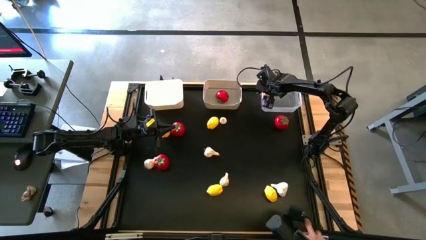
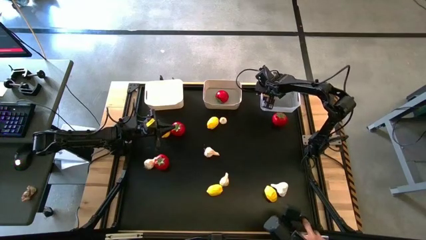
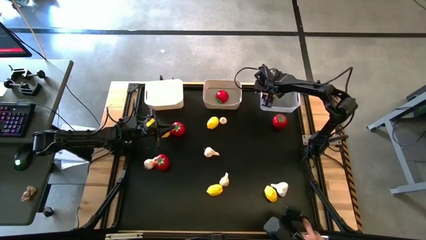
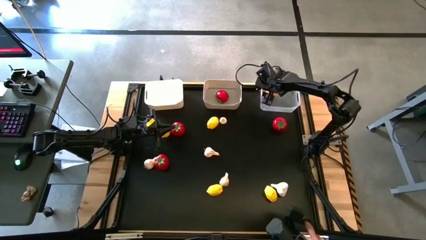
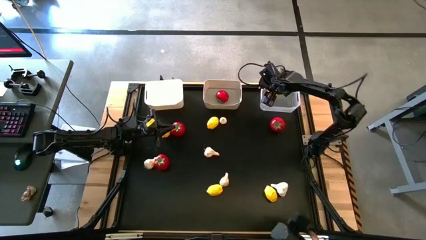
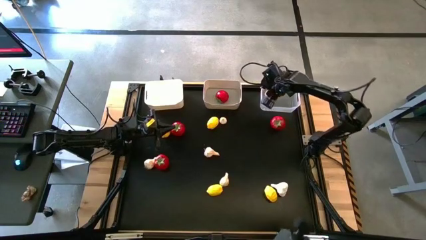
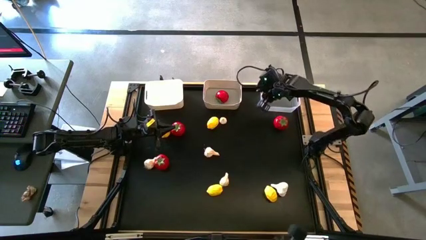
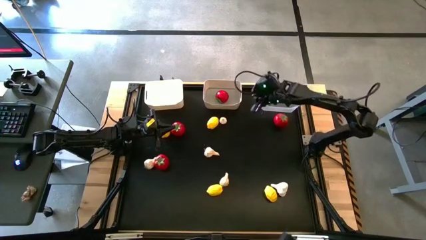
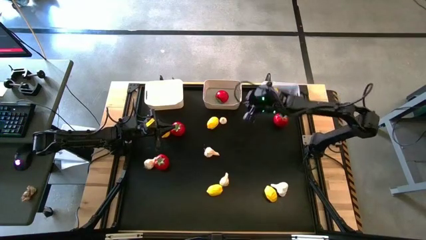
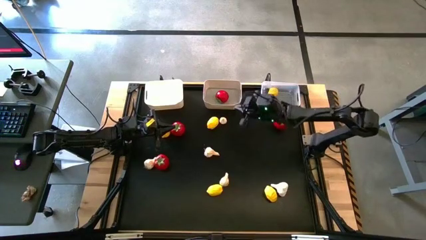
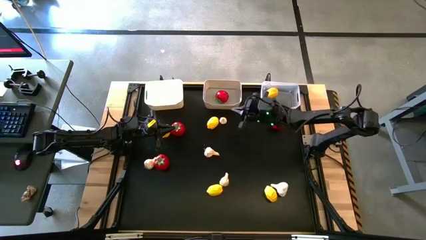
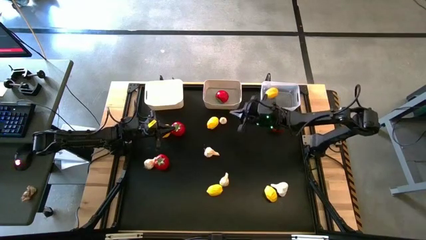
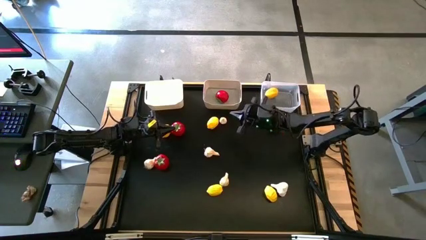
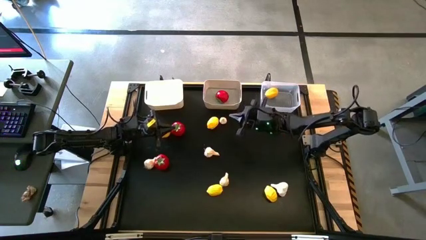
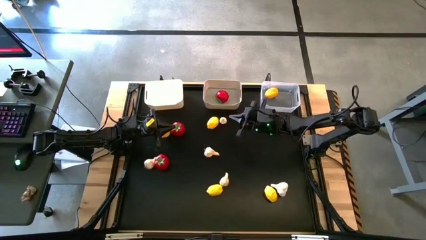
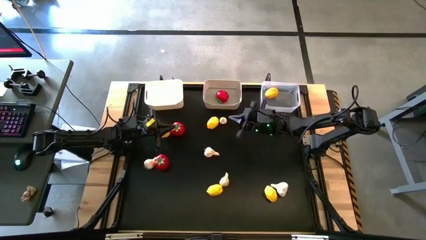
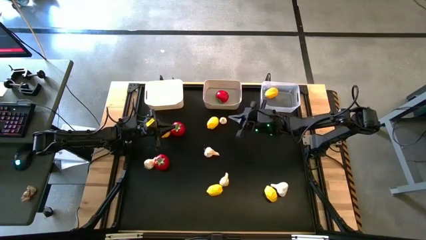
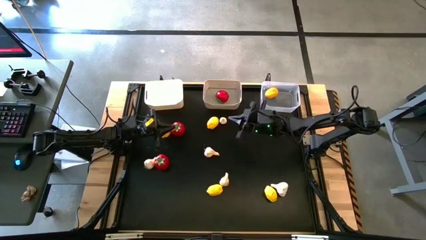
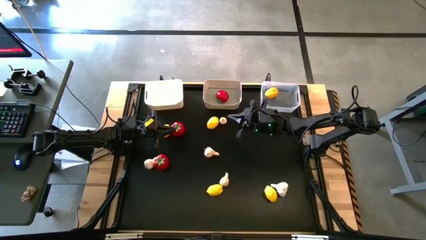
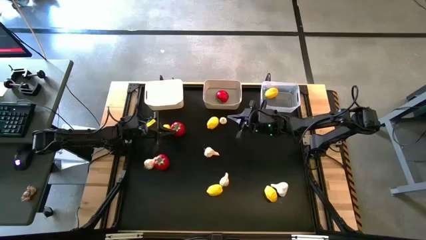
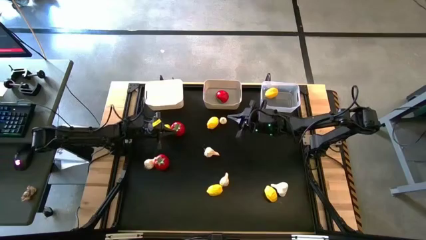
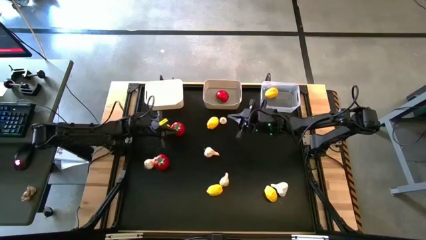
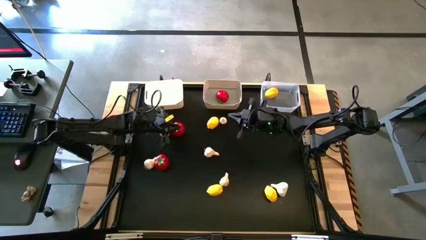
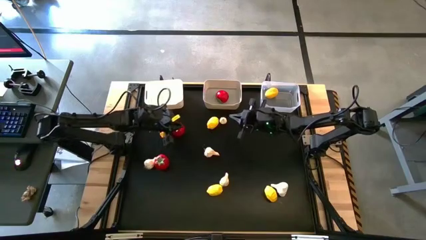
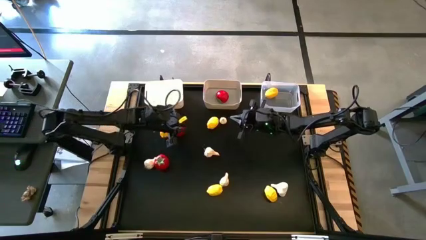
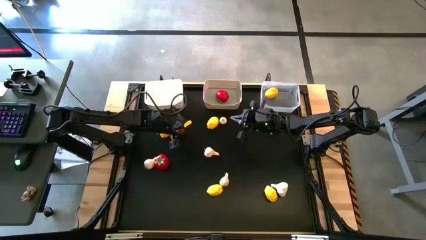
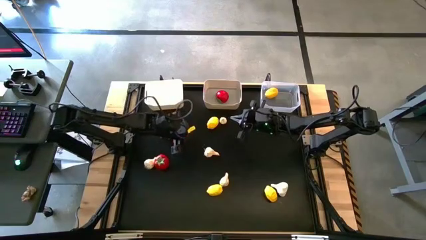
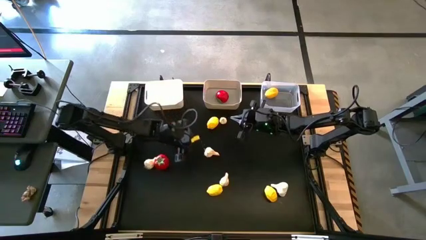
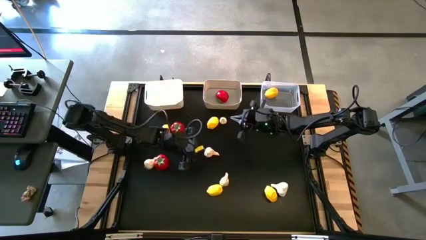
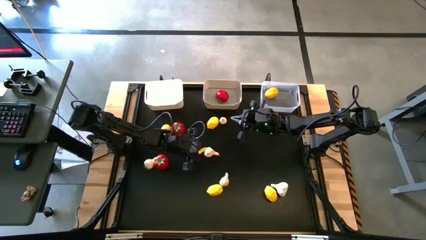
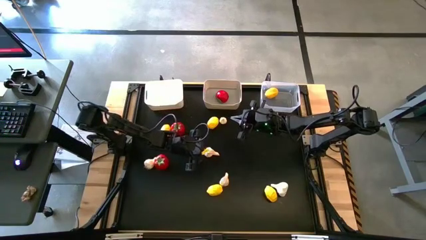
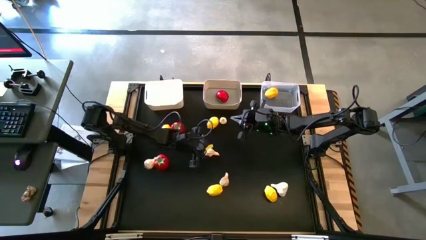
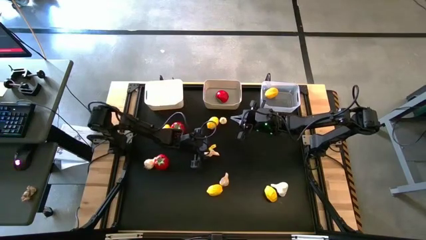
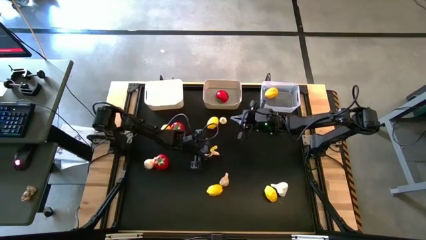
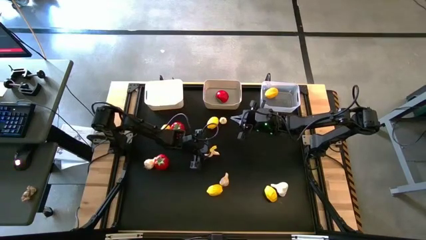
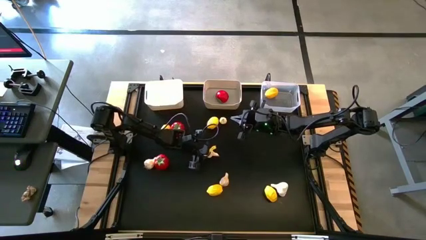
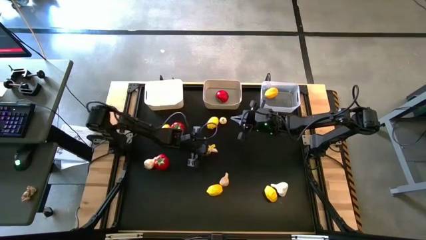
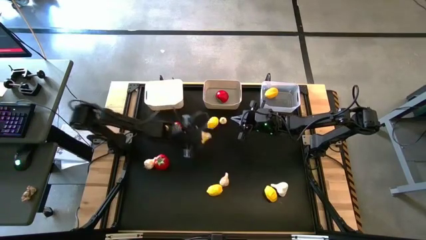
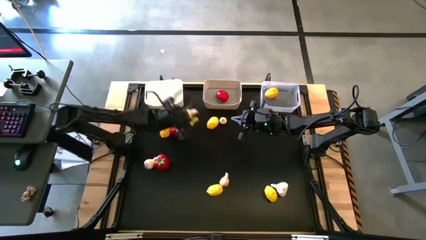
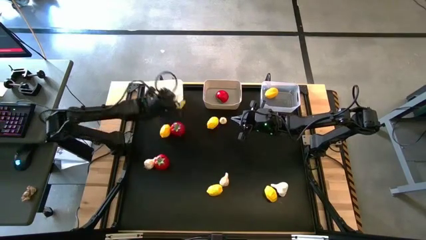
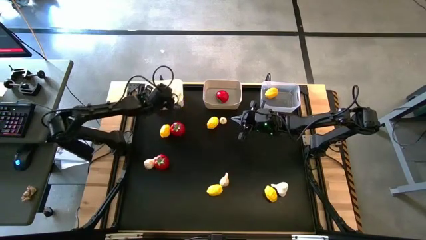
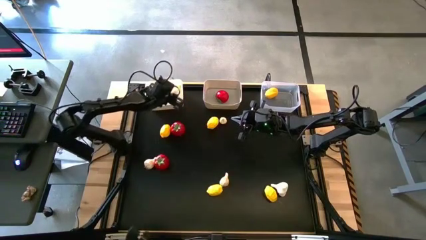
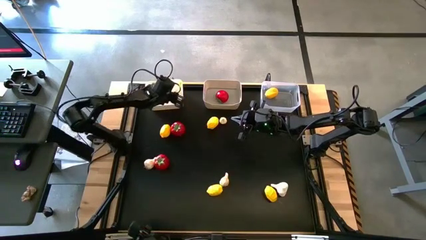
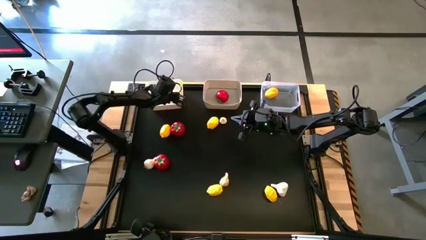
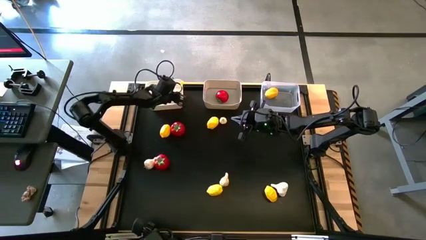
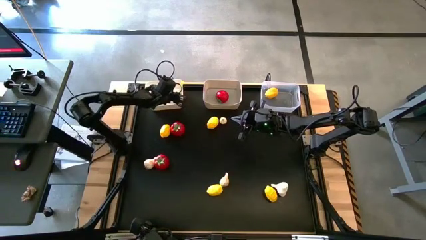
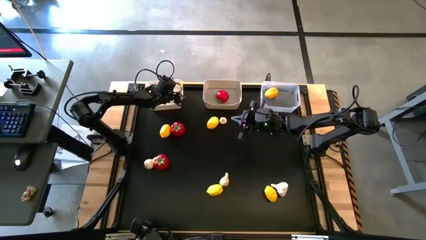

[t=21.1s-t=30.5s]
Task: Sort produce into baskets
Put the middle garlic into the white bin

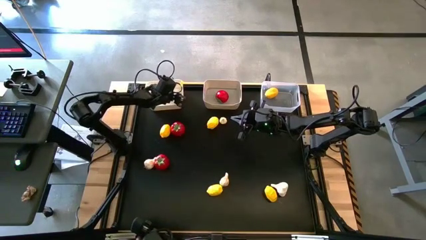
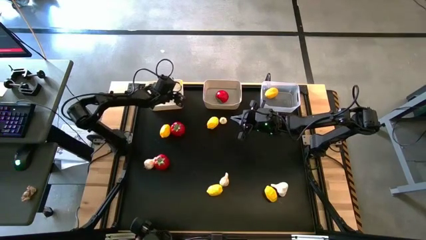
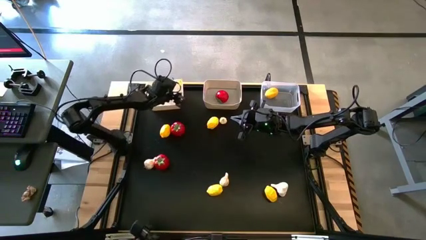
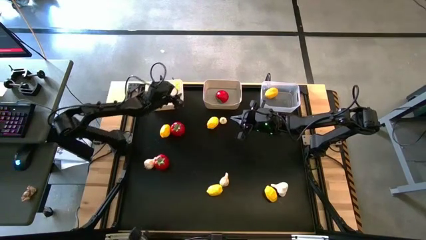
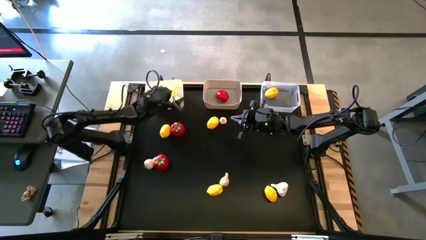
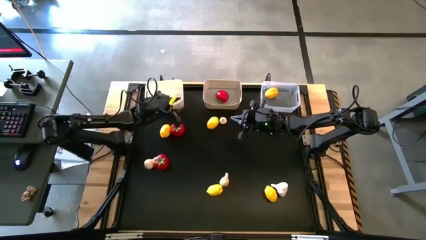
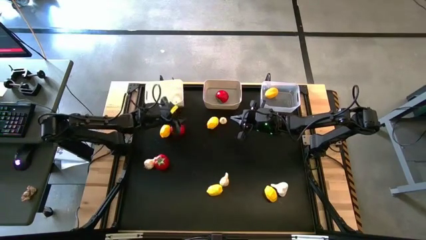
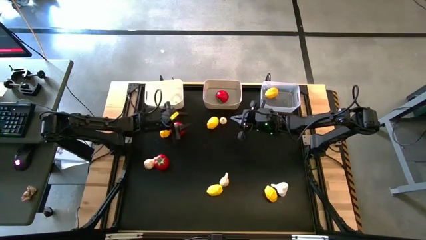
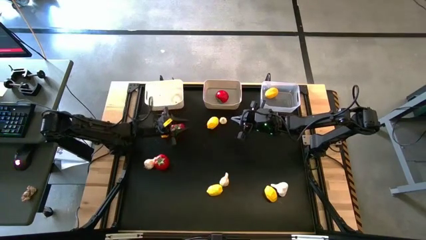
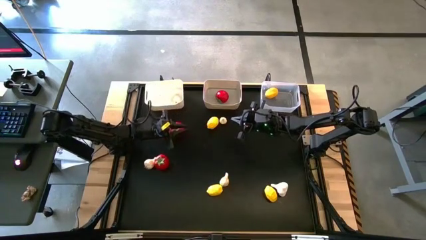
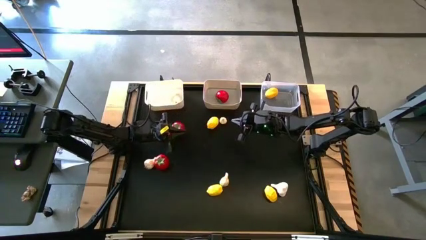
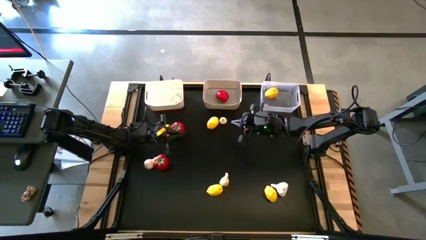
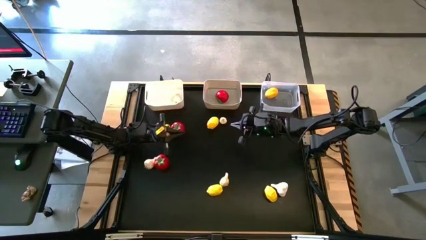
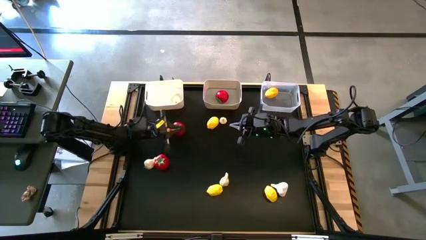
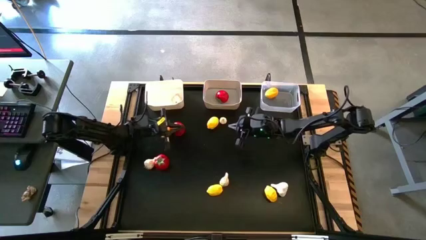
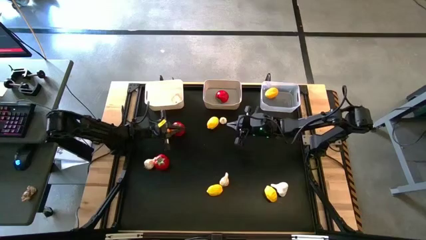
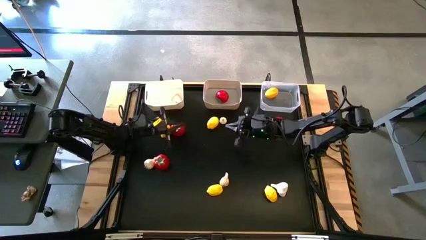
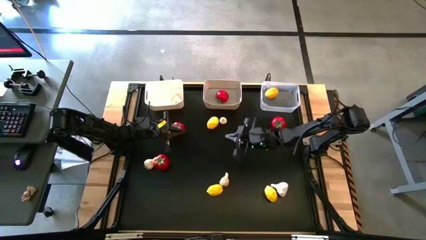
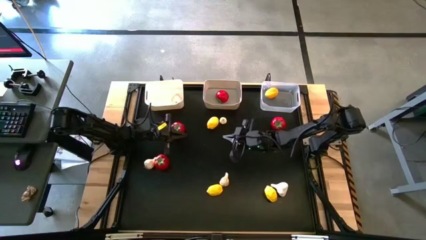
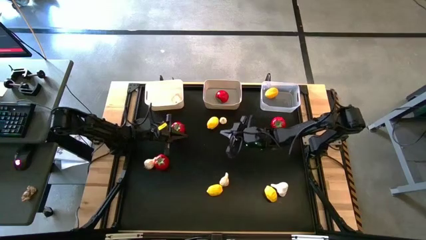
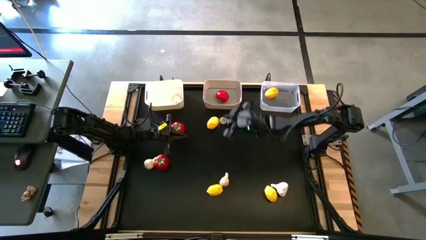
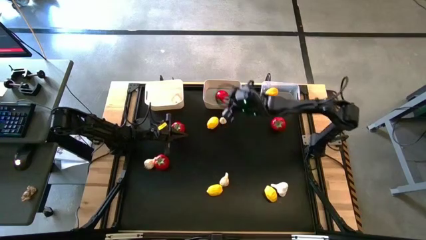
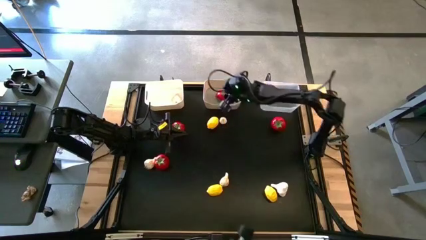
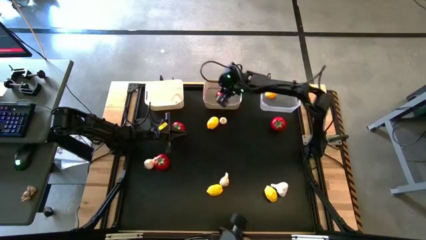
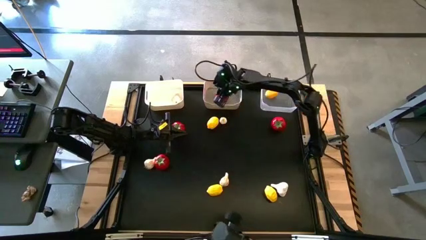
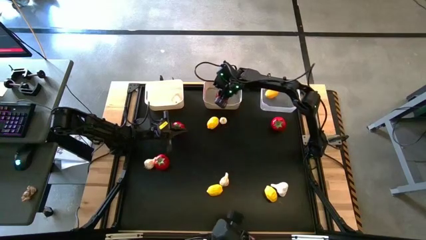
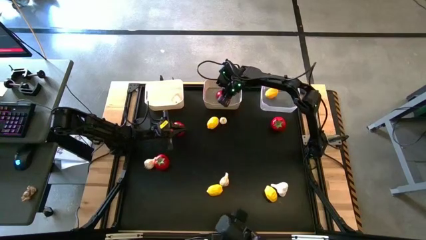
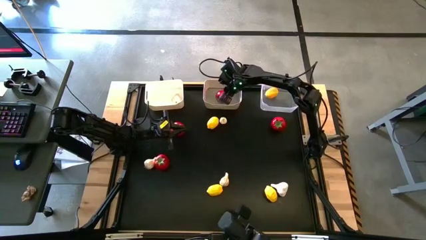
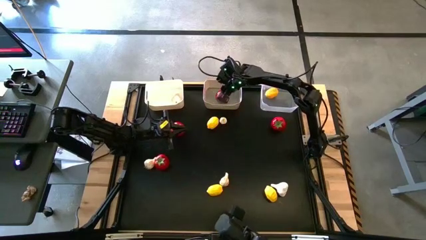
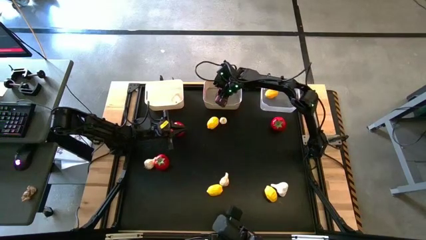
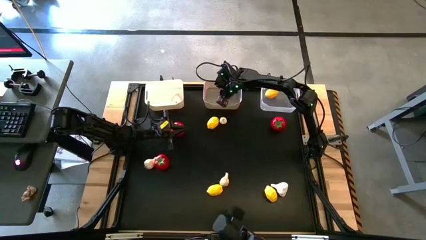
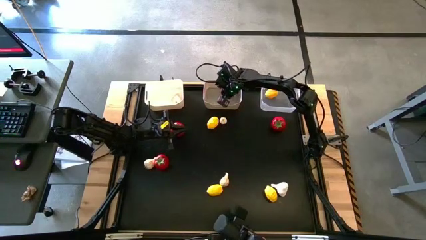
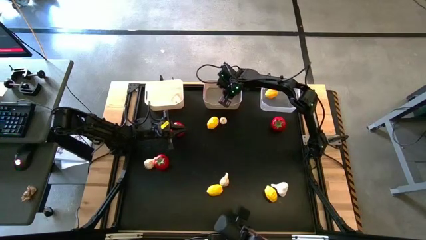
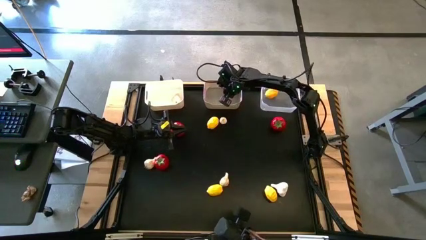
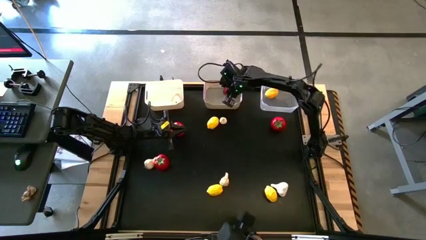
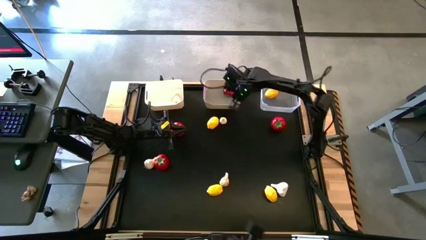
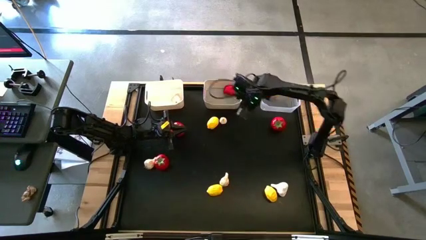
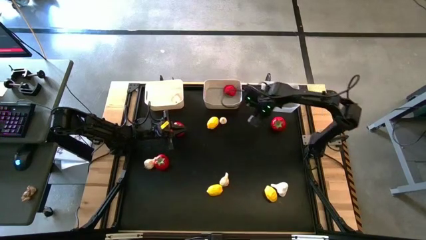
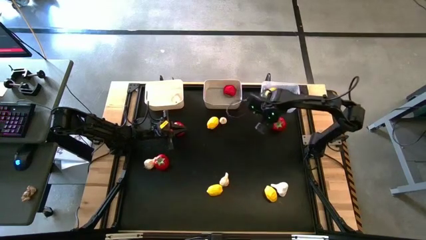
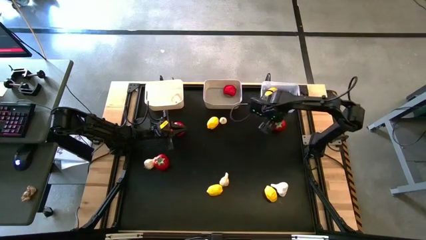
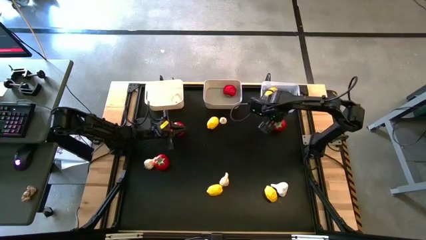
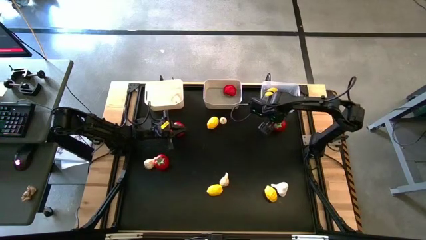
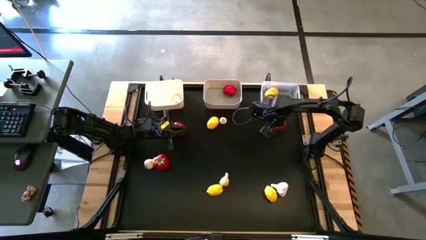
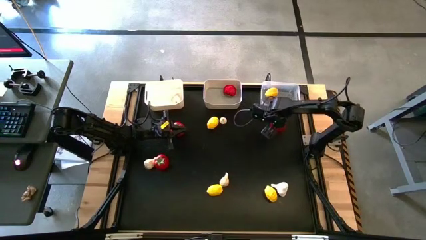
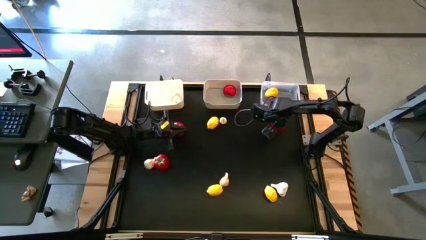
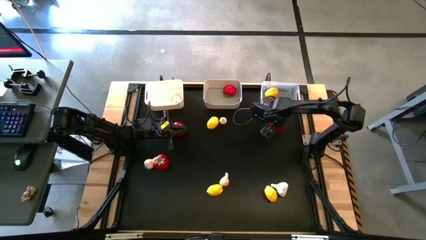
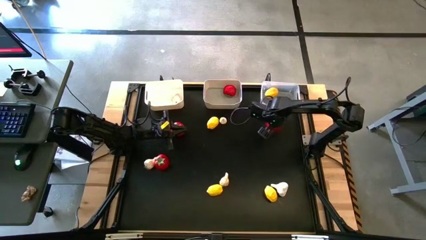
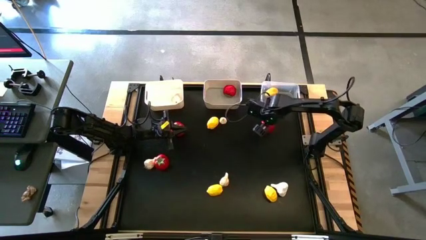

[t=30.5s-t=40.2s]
Put the top right tomato into the gray bin
